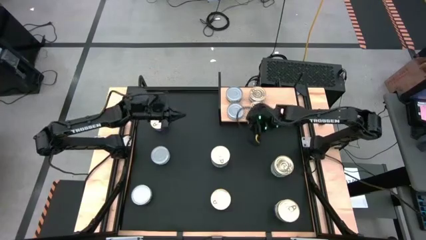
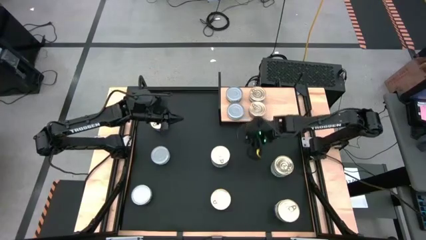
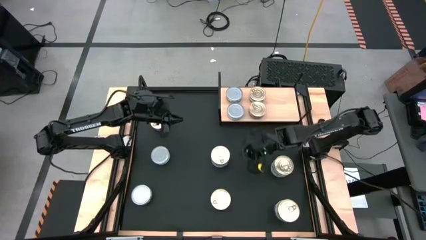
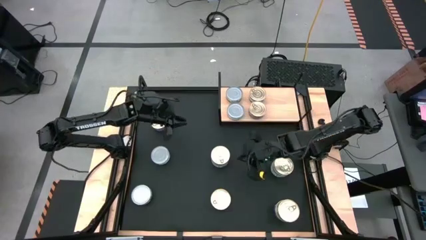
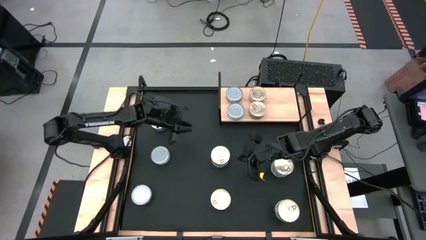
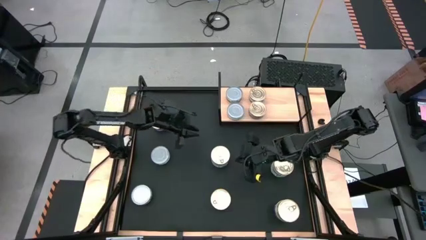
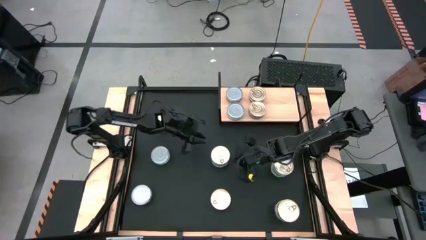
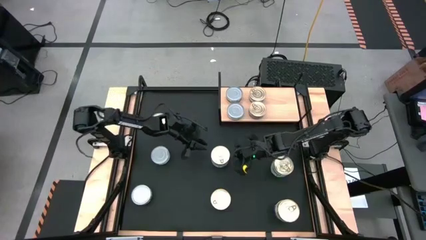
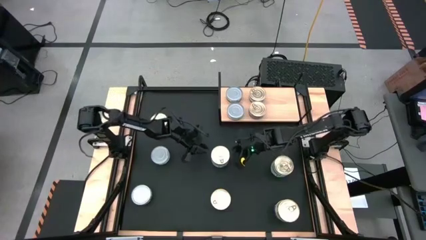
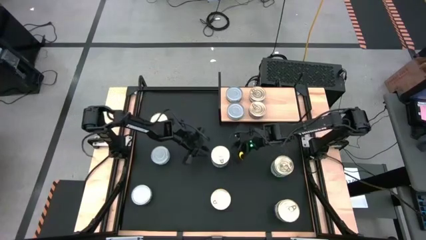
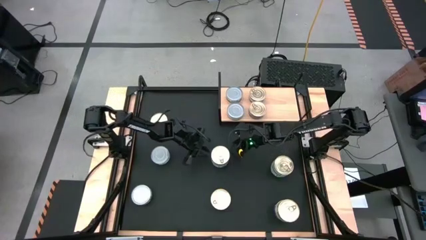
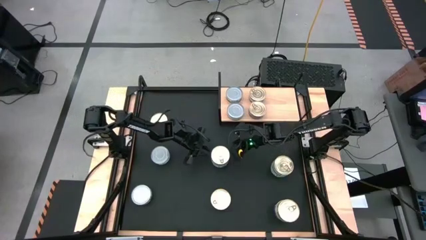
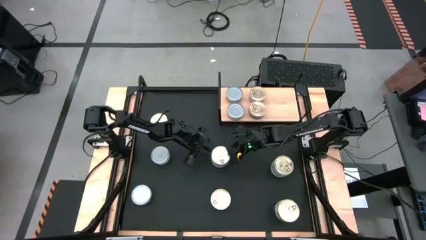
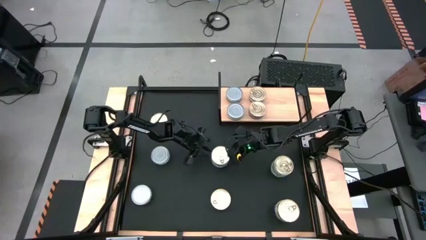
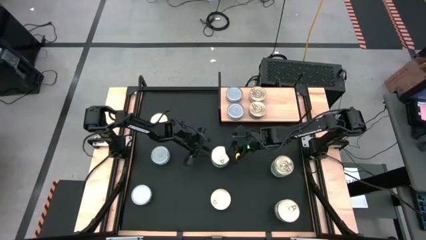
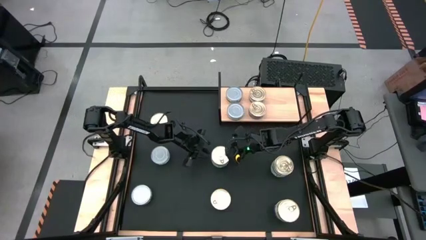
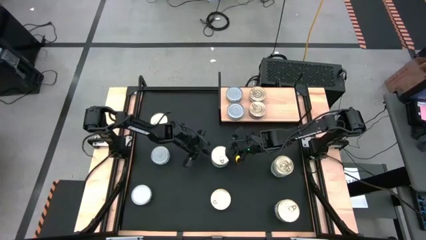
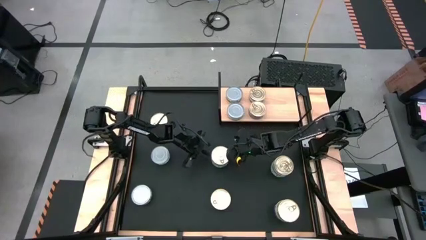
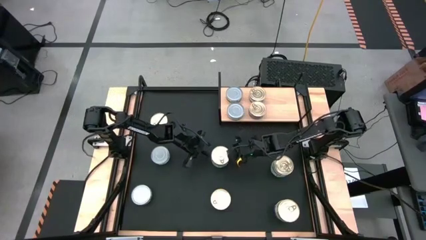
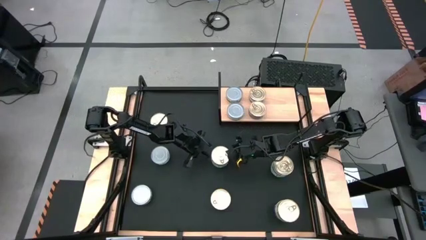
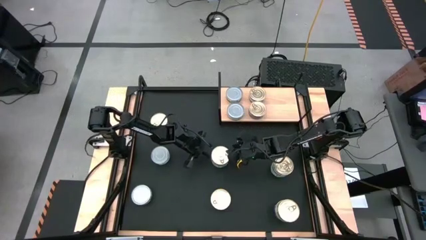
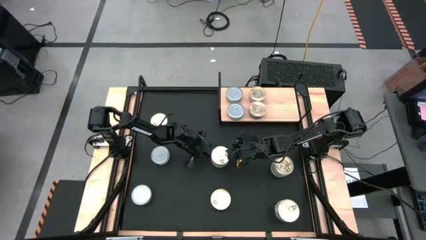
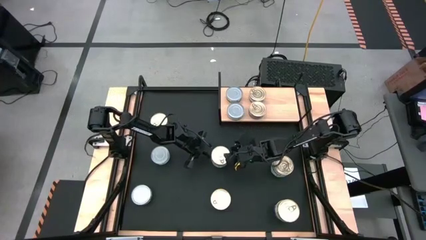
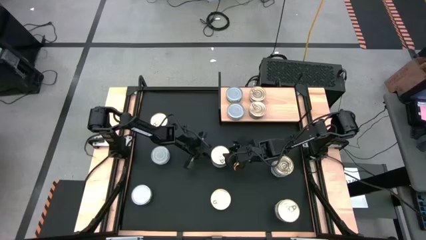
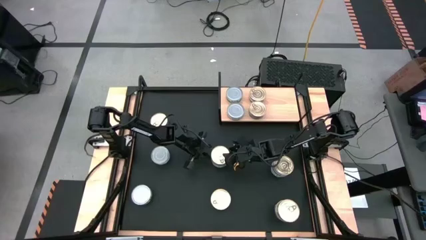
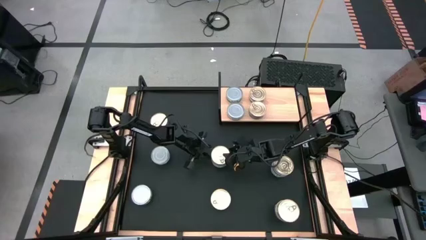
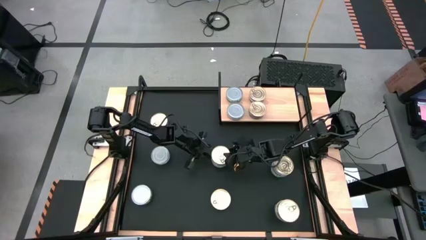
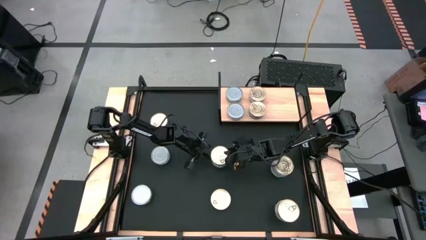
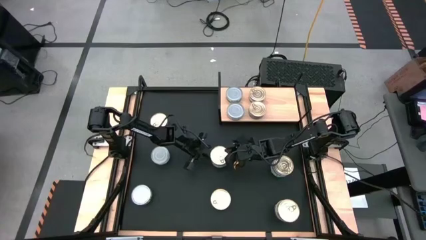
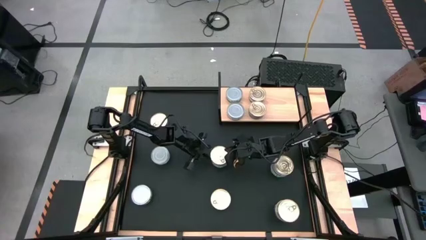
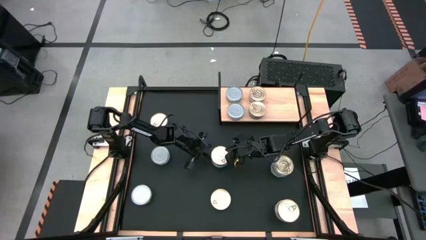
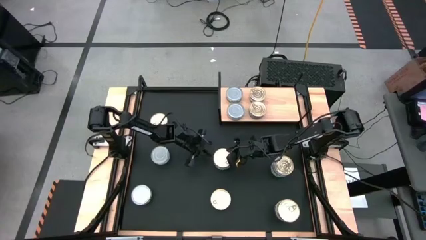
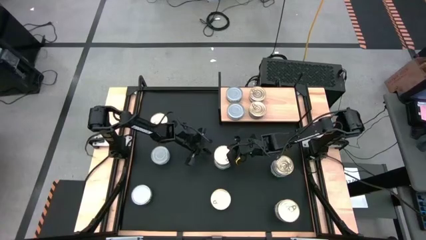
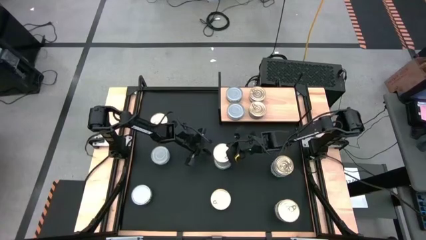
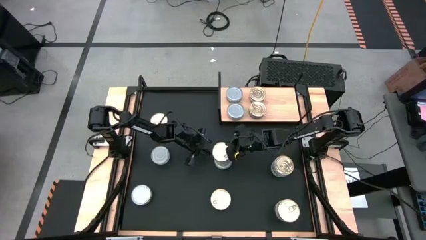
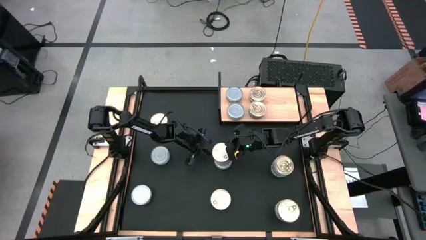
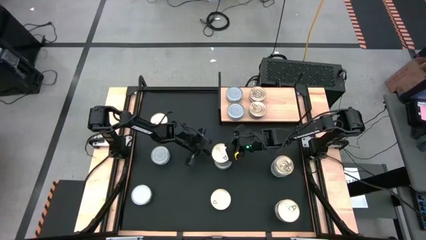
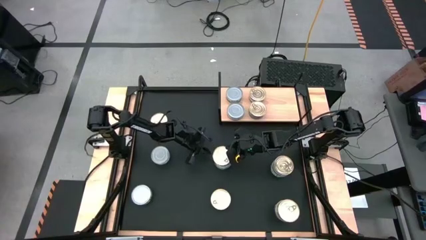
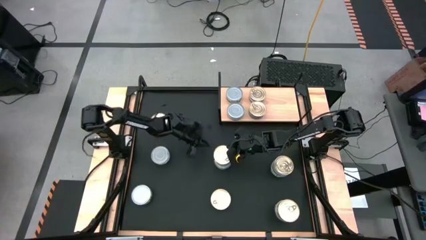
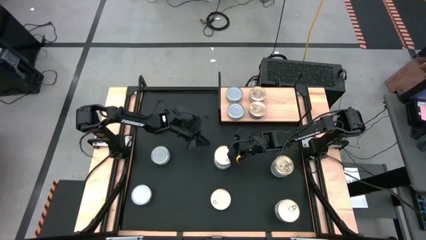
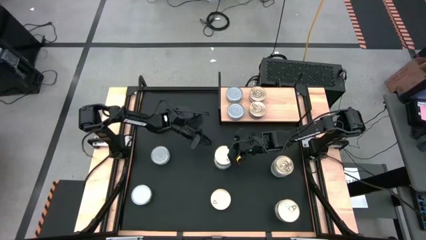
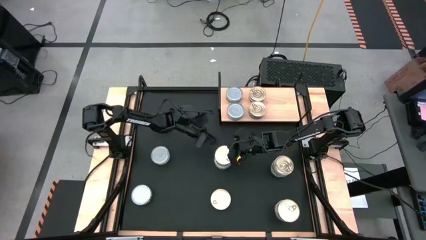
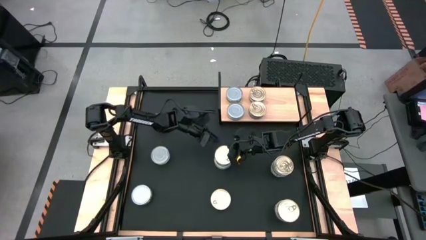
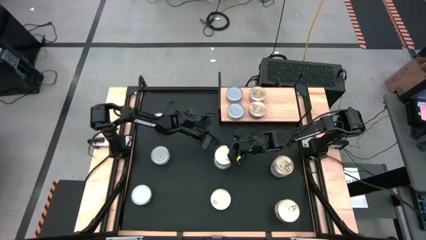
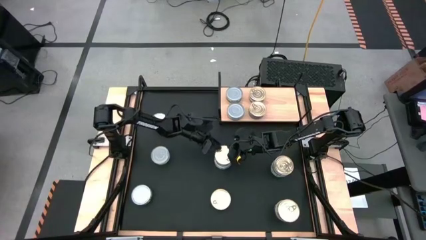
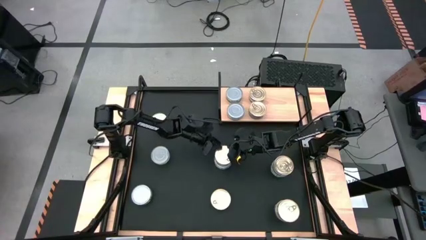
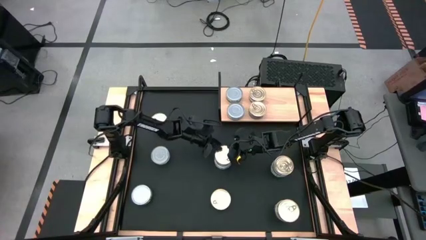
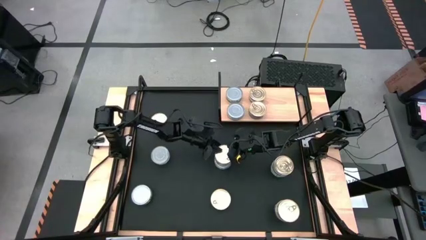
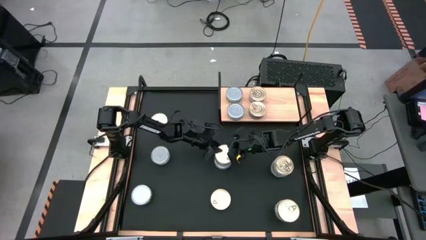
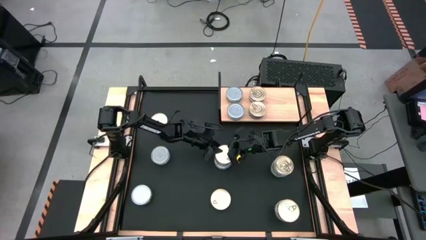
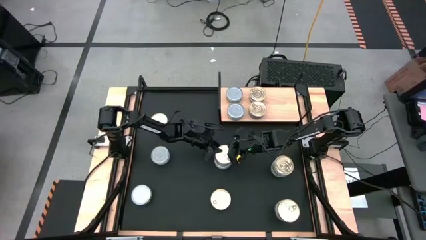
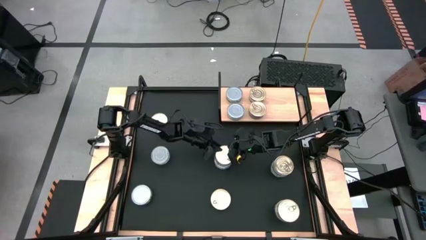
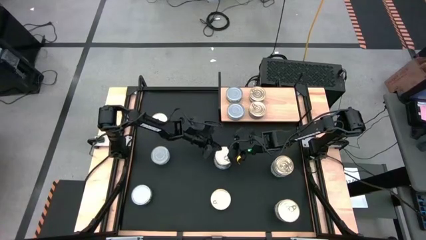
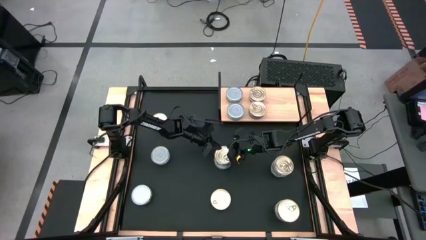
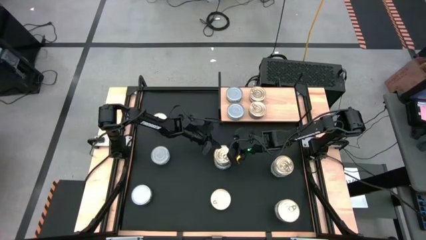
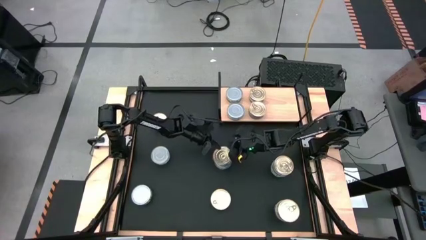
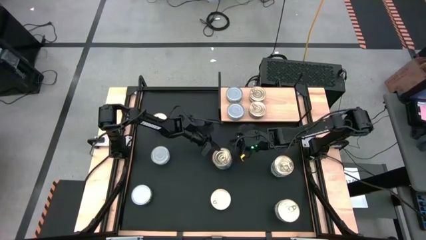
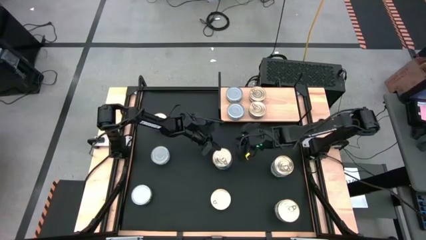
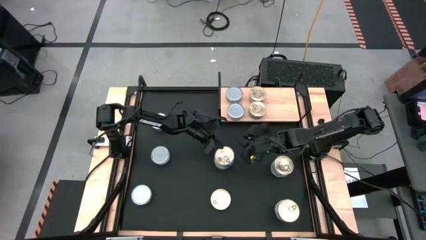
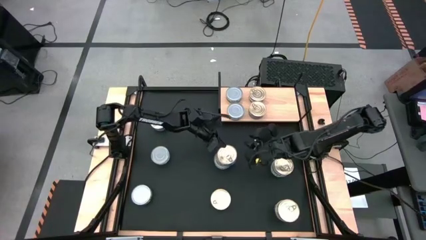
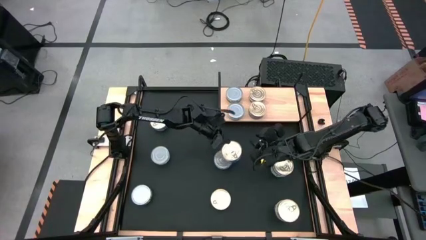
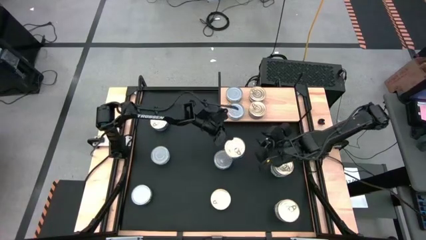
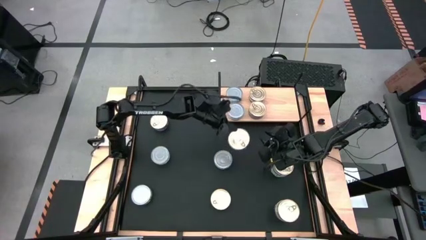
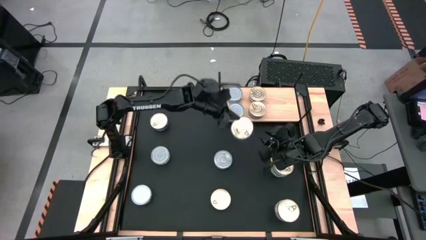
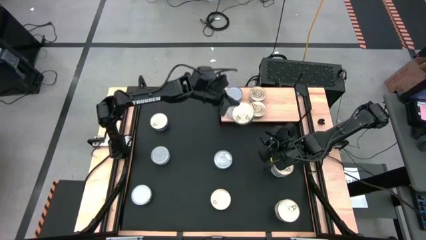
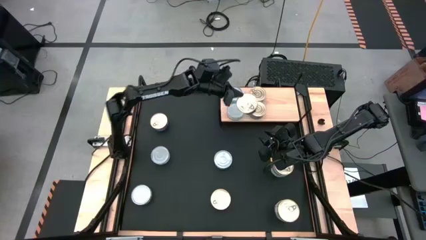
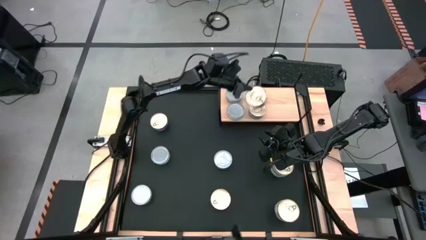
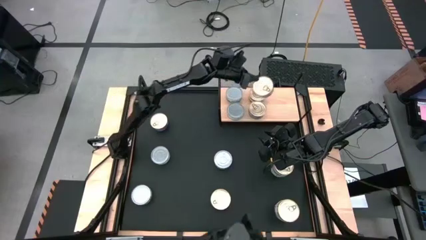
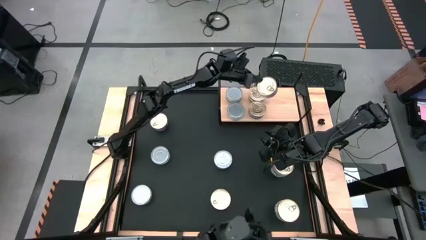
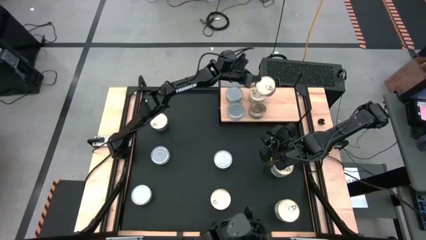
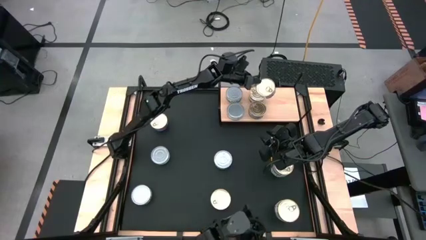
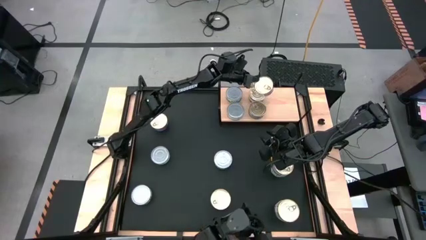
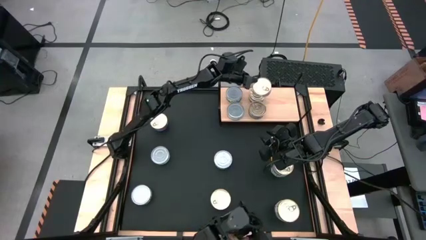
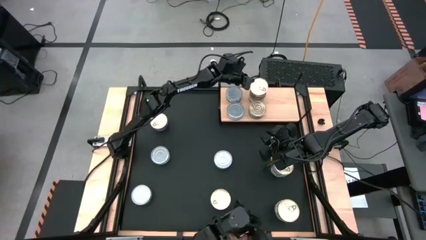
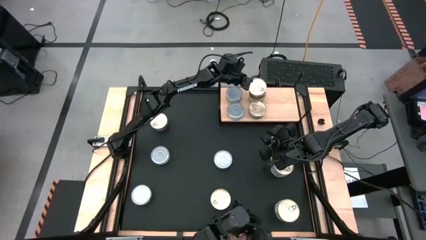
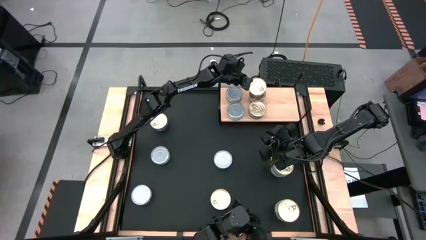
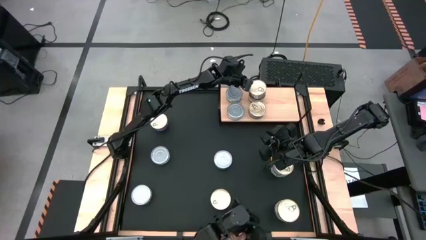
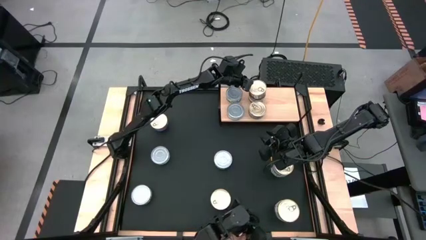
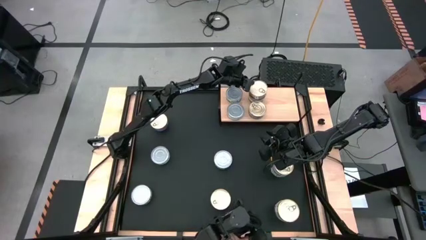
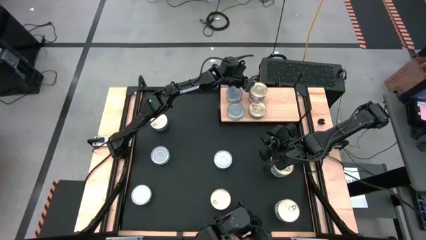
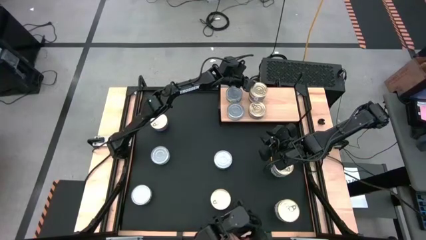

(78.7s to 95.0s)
Task: Stack canned seafood by type on shelf
Stack the blue pink tuna can on top of the other blue pink tuna can on the shelf
